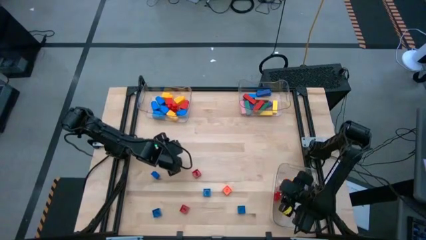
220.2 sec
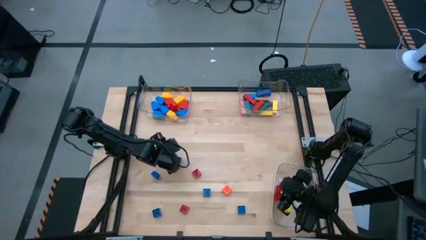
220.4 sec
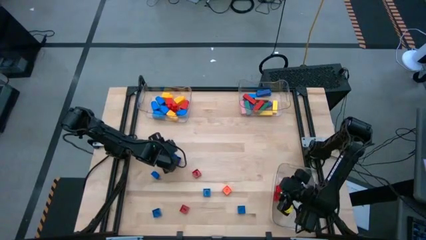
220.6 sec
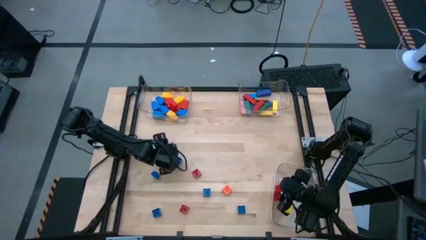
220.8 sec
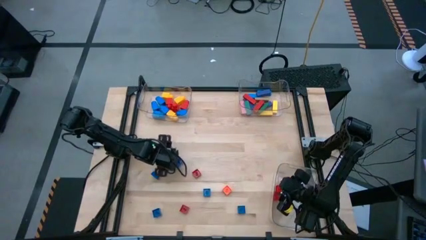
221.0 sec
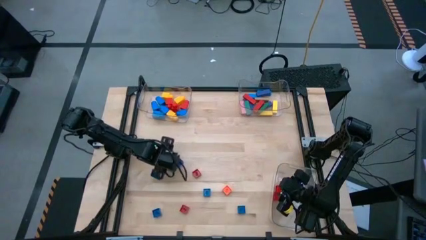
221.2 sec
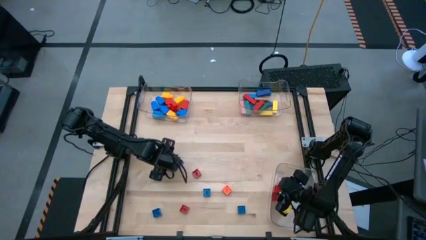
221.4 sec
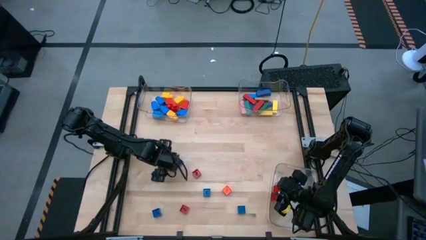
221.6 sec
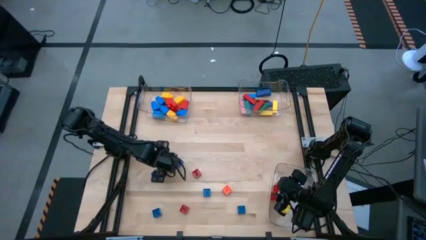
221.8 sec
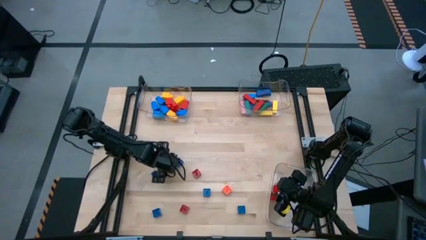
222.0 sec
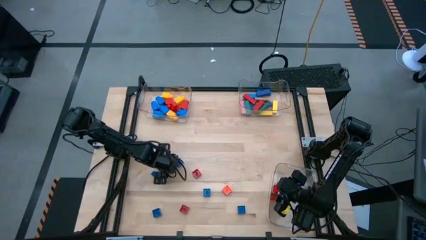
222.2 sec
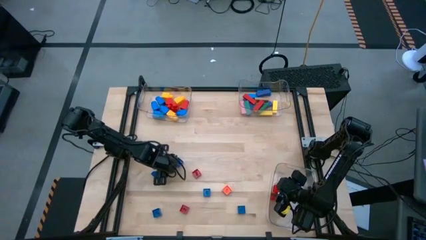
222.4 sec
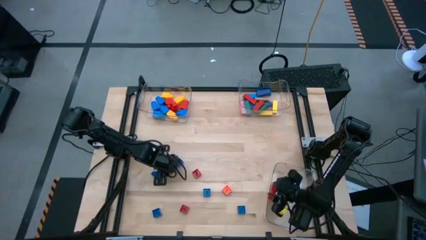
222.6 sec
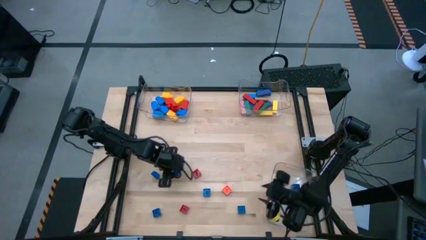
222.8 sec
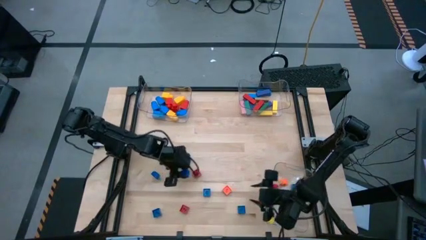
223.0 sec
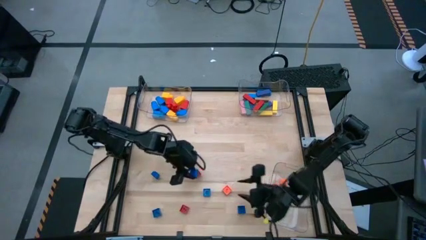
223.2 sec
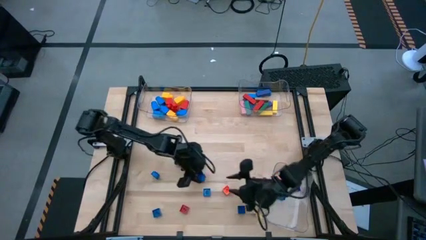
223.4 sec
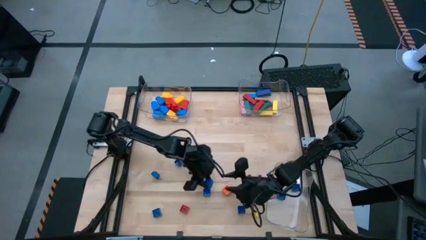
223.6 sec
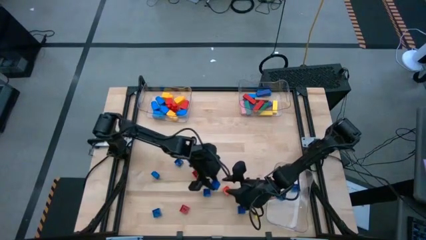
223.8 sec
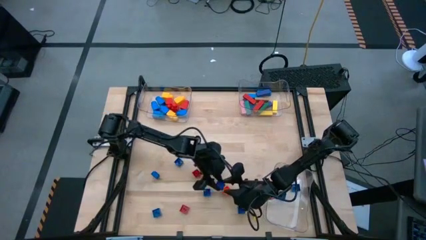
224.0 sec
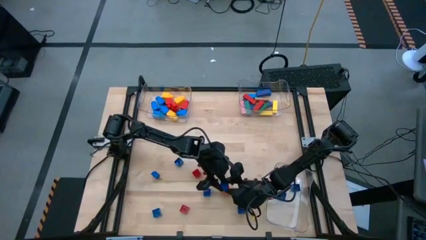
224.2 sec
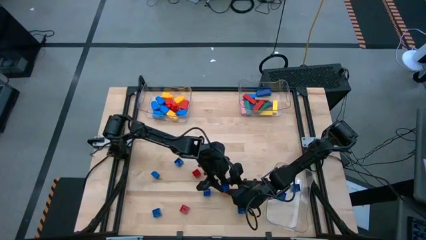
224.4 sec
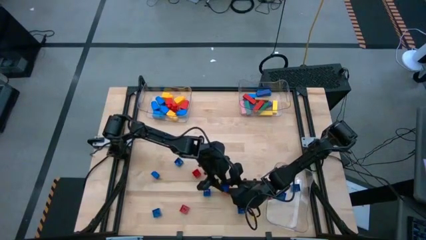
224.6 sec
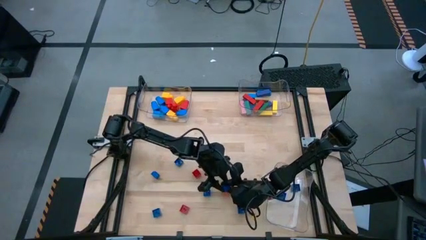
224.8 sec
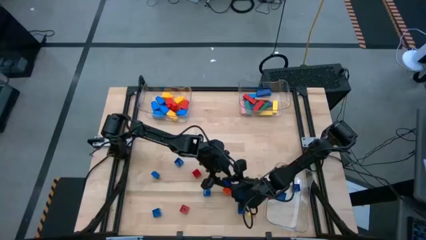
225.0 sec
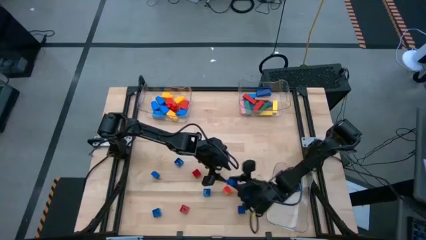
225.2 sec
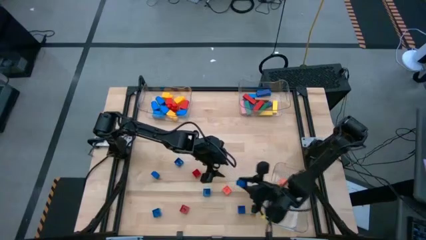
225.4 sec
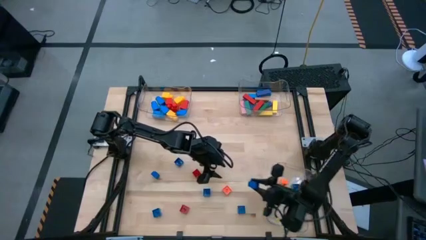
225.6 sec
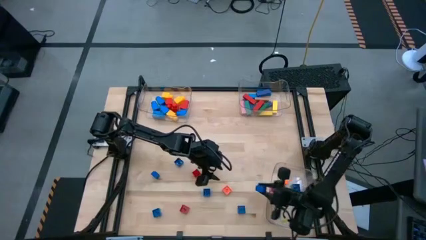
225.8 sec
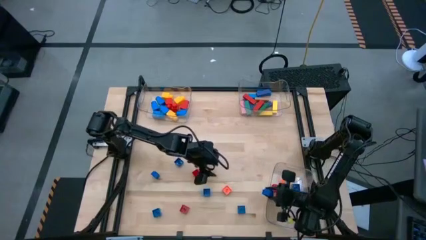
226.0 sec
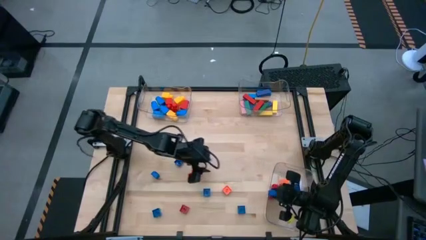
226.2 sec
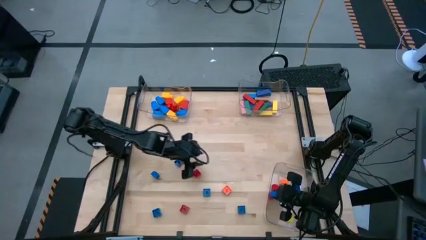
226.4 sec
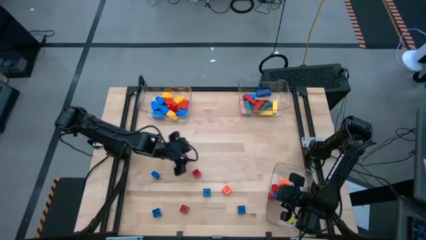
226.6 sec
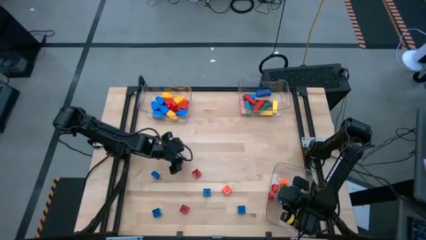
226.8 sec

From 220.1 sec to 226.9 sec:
Task: Sort blocks by size
Put the 4 stud blue game piece into the bottom transparent bin

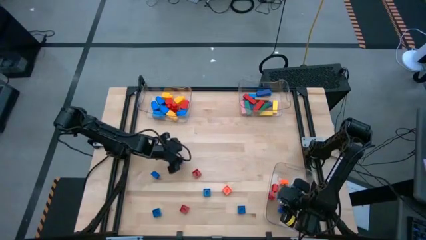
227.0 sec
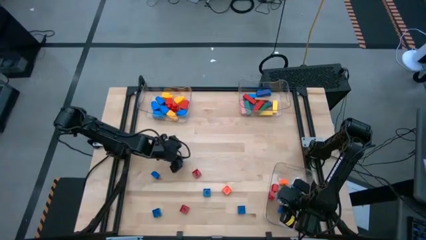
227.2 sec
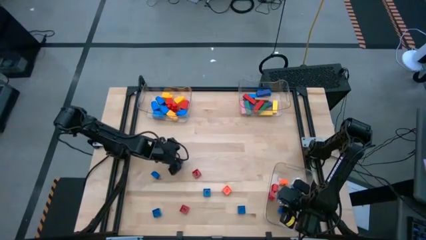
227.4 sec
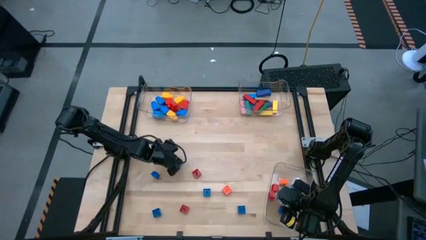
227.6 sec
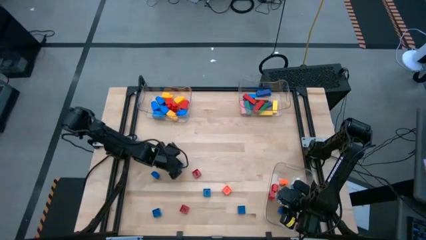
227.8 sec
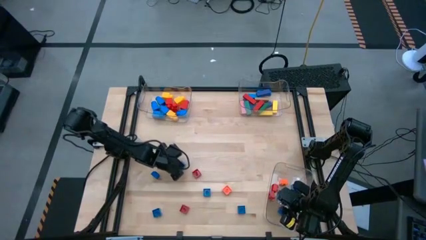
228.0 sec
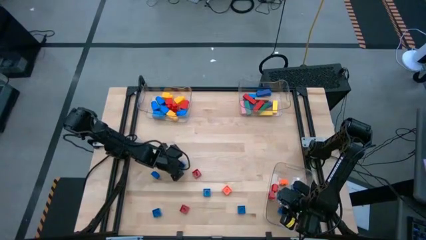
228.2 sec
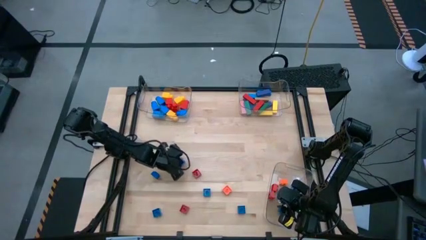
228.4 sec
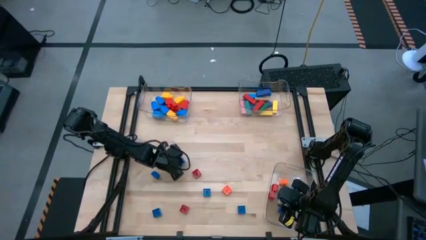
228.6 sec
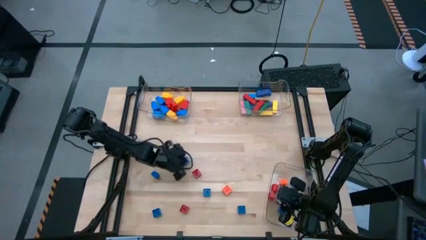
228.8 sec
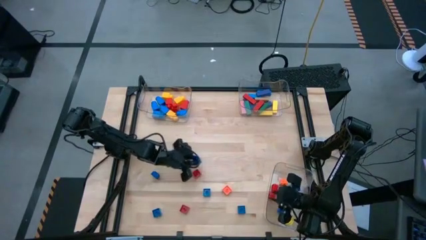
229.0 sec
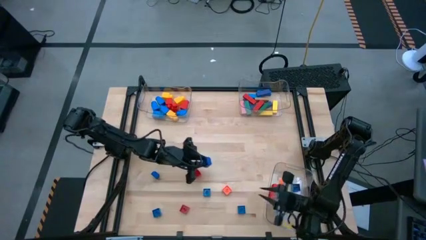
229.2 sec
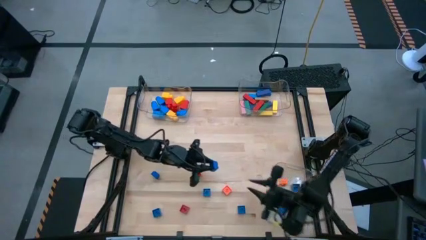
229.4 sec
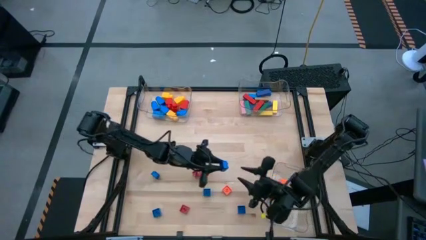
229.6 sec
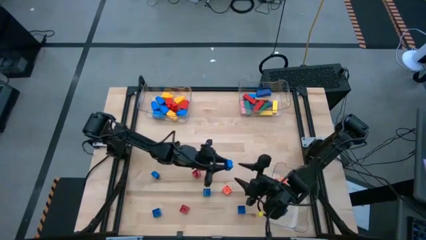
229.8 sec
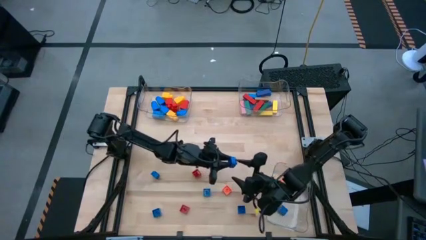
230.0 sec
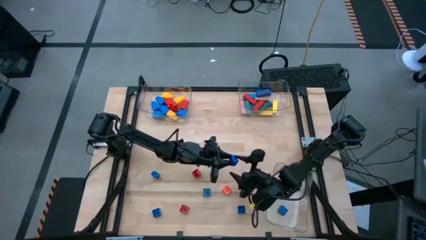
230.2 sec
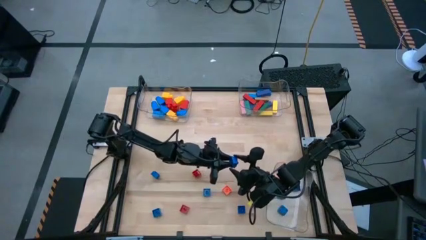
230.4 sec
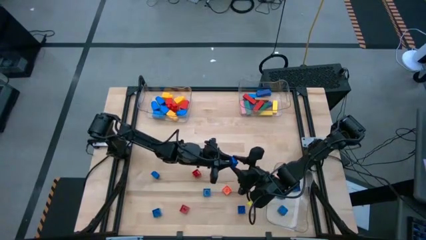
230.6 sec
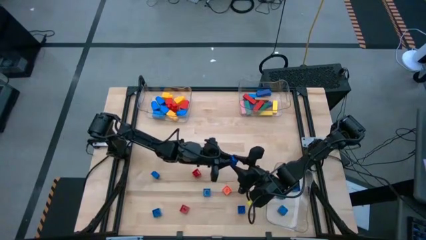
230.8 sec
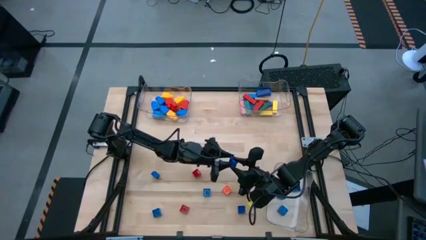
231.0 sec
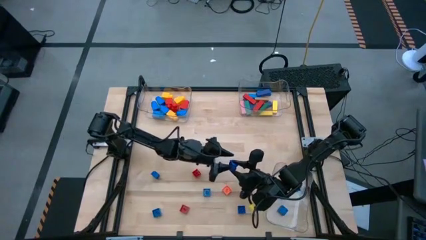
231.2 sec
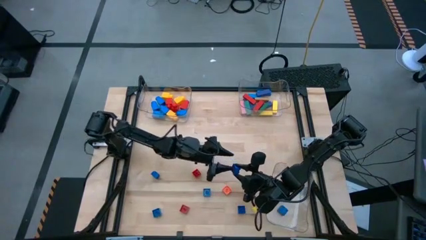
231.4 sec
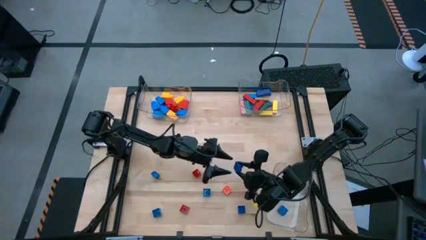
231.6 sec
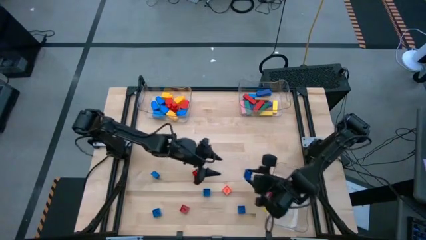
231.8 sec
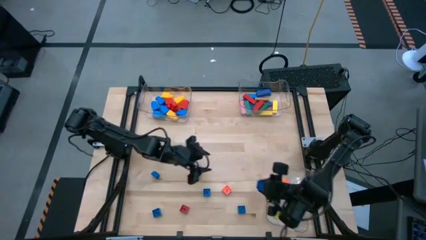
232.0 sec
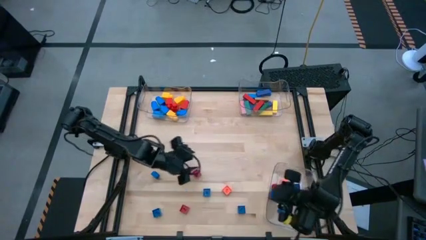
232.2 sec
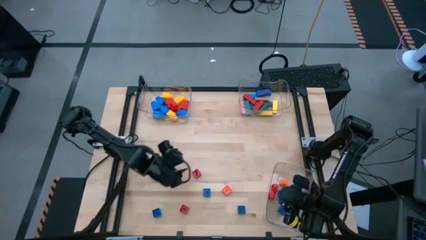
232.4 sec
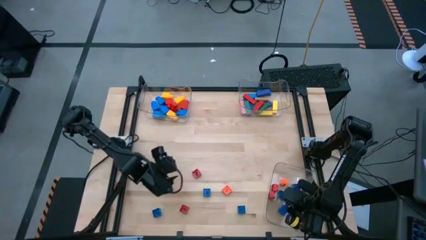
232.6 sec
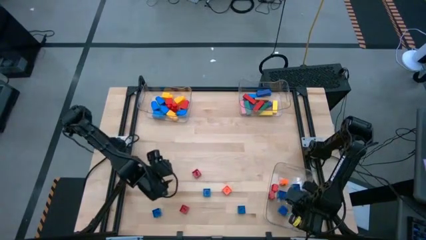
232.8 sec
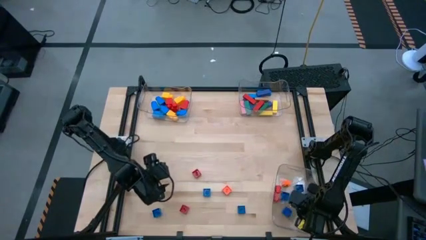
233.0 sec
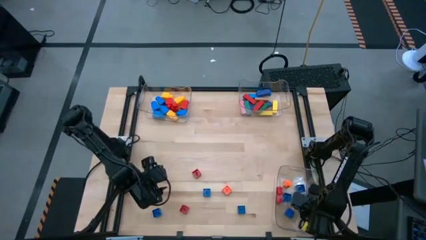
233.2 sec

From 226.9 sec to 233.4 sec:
Put the 4 stud blue game piece into the bottom transparent bin

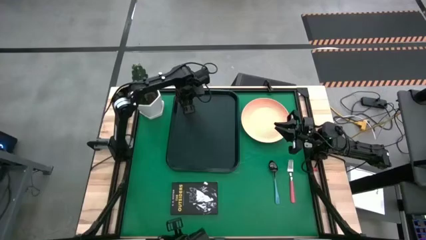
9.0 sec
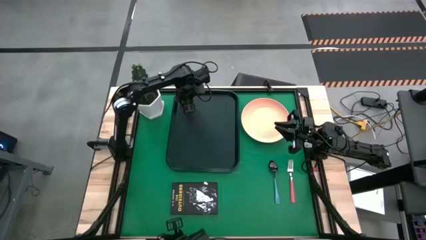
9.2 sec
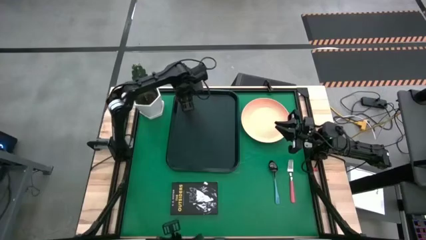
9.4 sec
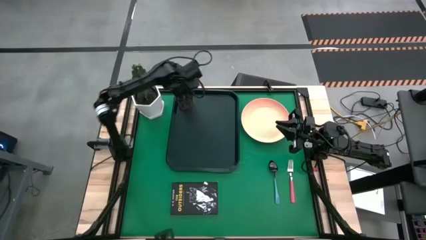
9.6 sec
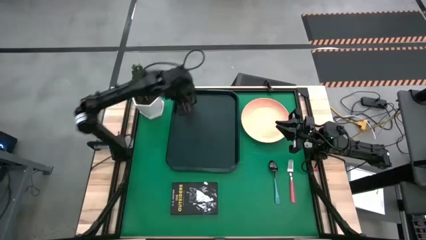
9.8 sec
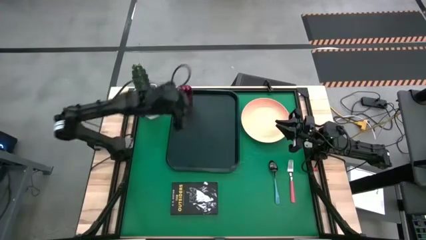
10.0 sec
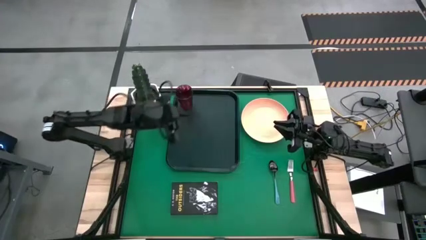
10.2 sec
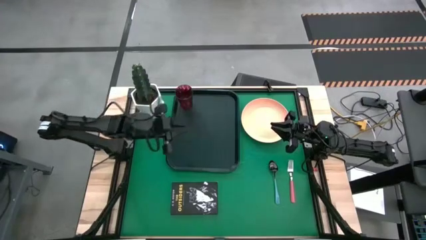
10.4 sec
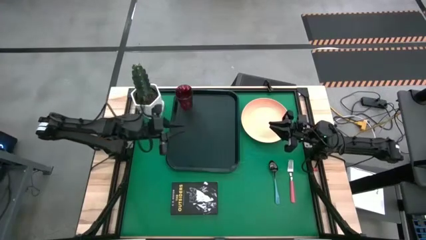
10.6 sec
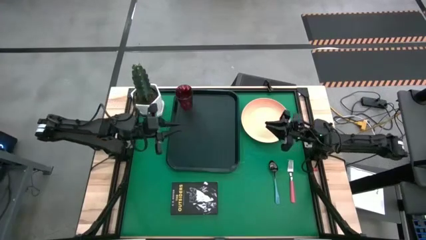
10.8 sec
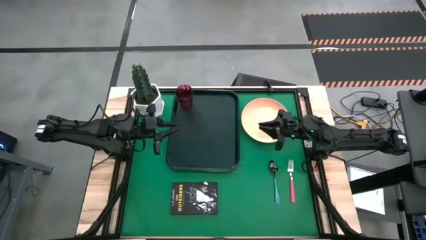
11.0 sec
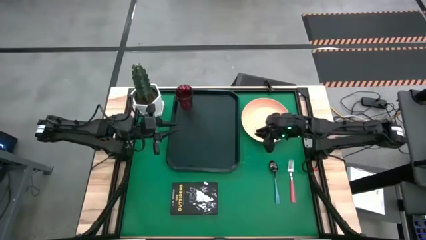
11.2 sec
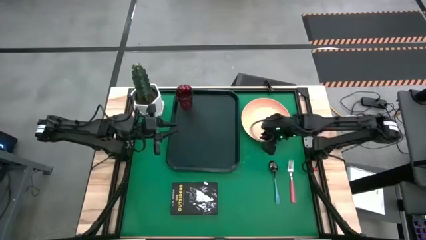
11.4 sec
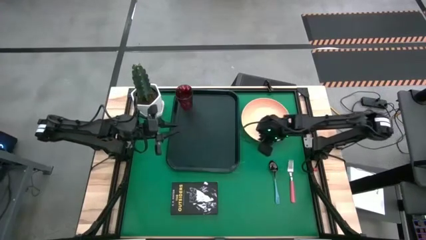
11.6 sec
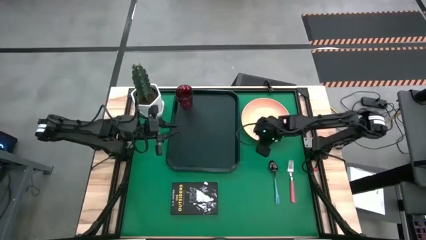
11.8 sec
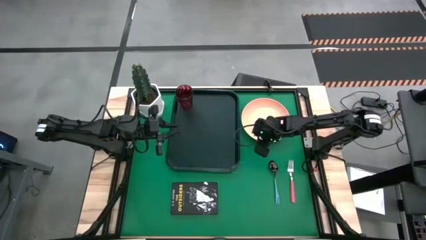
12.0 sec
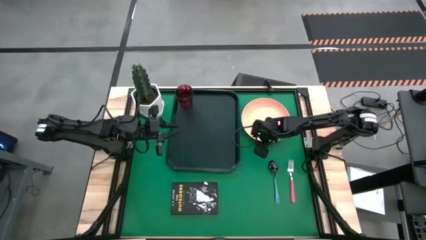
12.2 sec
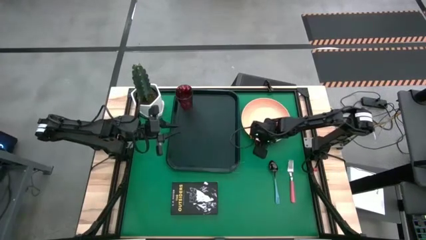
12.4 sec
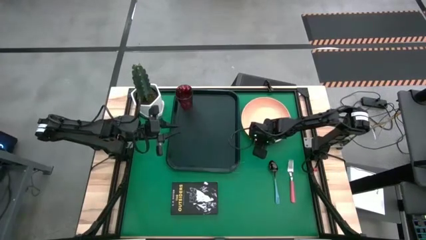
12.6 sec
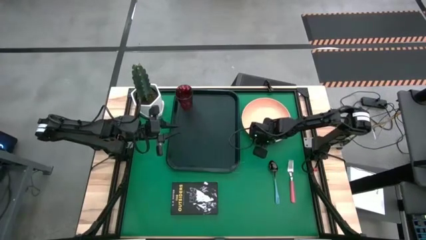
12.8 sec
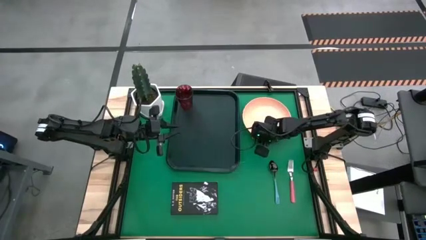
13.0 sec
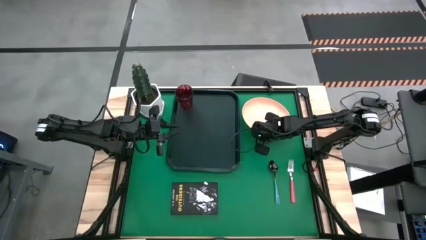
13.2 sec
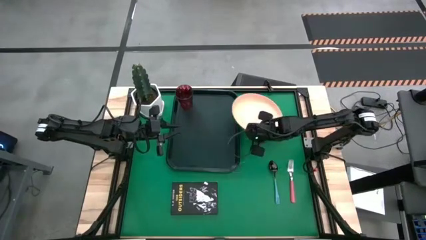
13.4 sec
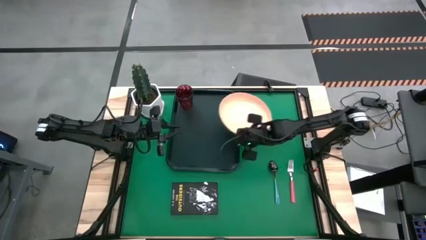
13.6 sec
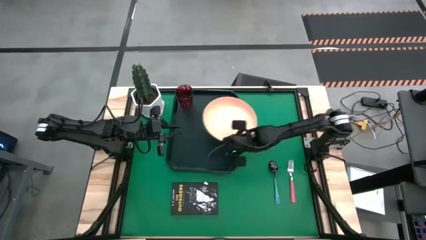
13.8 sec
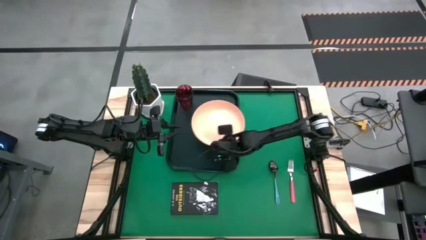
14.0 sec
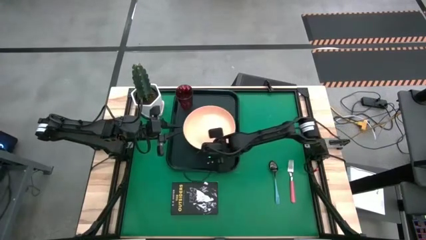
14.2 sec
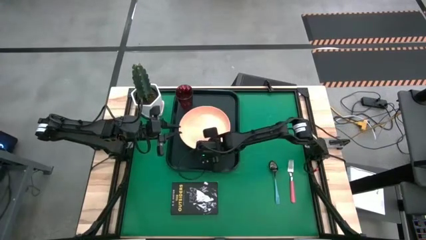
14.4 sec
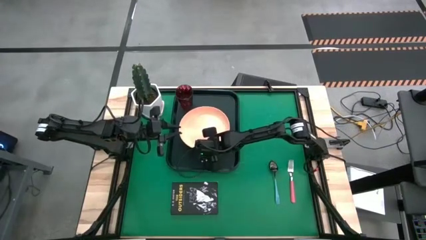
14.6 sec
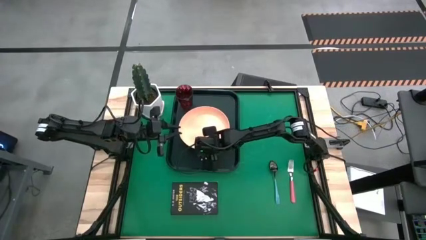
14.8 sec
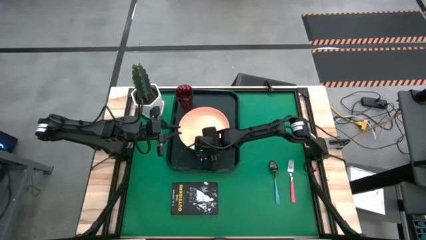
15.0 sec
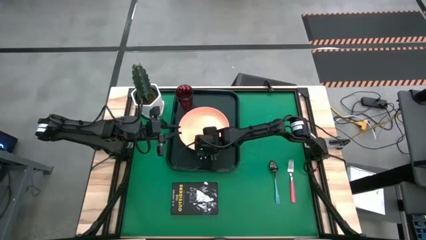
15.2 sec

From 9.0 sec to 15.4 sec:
Task: Pick and place plate/cup/fork/spoon on tray
Put the orange plate on the black tray below the red glass
